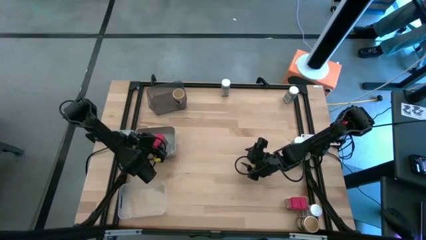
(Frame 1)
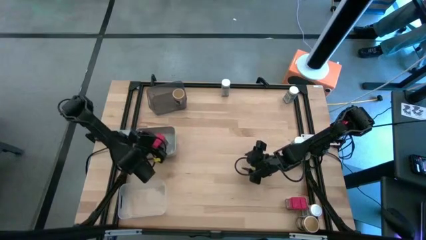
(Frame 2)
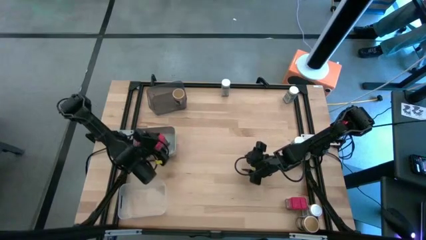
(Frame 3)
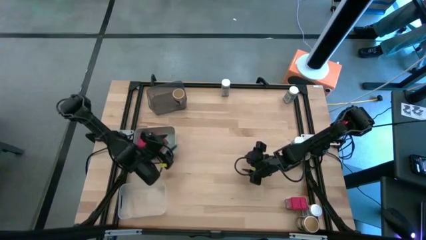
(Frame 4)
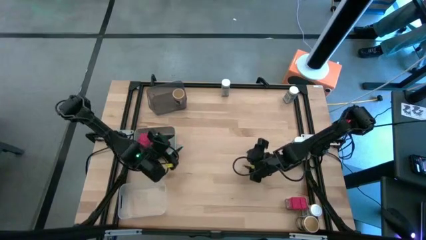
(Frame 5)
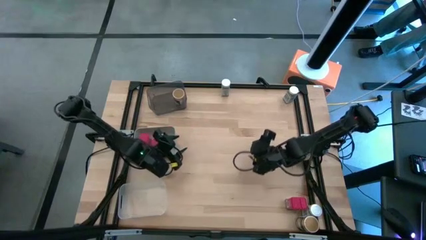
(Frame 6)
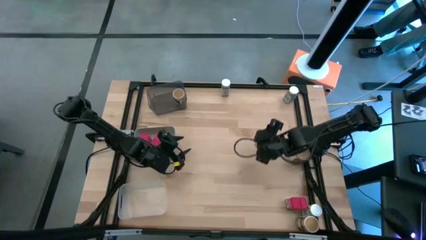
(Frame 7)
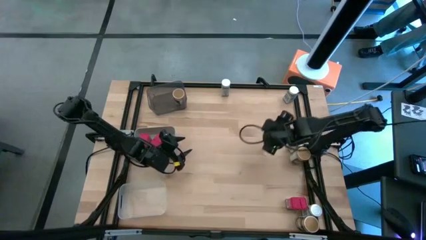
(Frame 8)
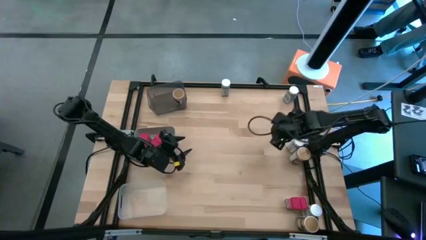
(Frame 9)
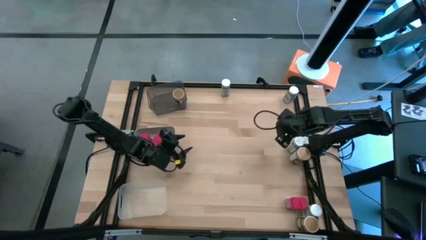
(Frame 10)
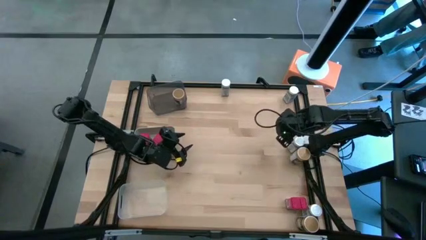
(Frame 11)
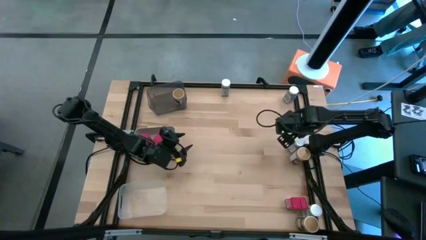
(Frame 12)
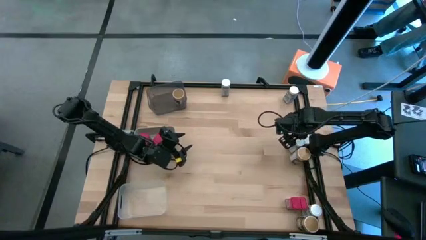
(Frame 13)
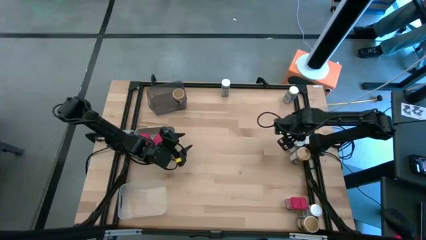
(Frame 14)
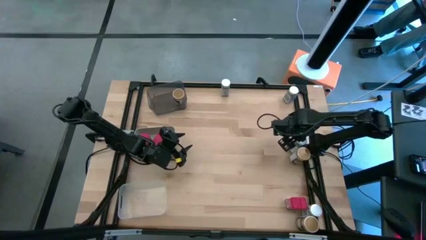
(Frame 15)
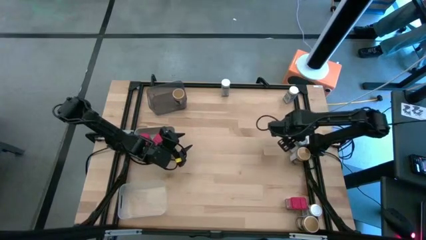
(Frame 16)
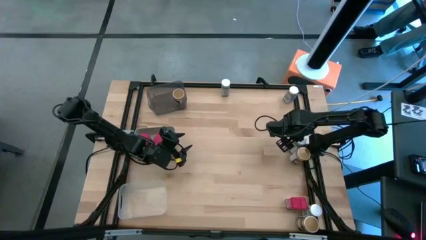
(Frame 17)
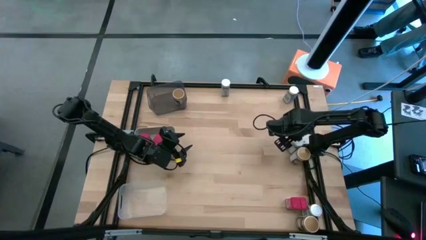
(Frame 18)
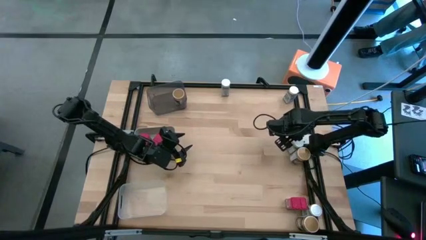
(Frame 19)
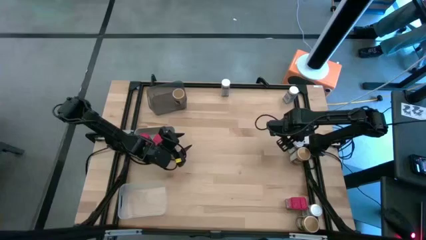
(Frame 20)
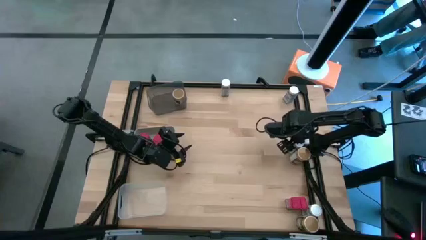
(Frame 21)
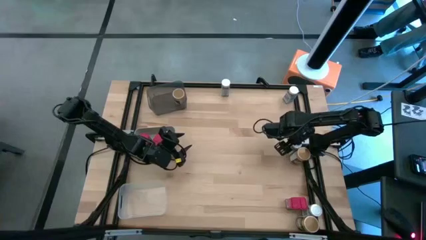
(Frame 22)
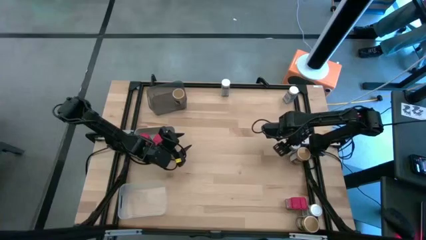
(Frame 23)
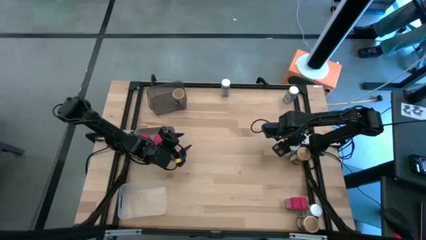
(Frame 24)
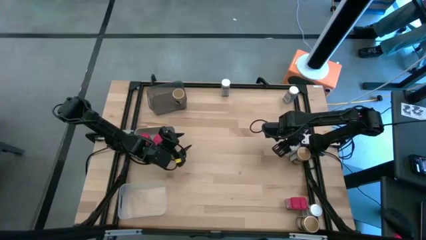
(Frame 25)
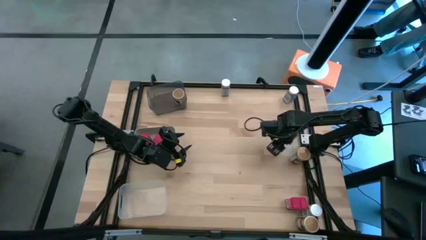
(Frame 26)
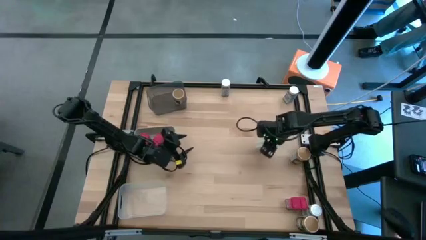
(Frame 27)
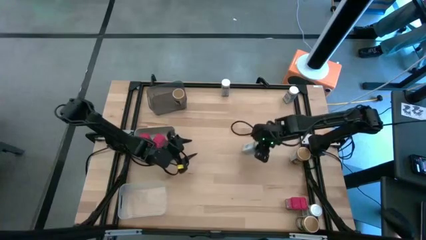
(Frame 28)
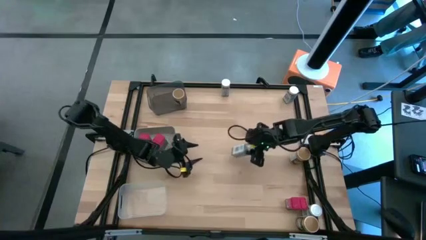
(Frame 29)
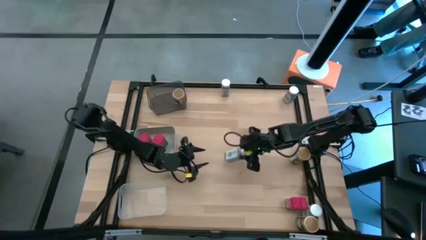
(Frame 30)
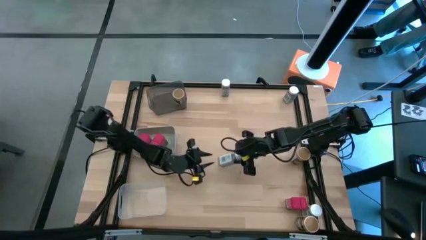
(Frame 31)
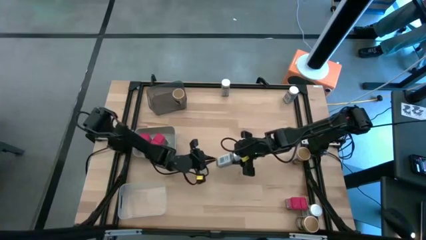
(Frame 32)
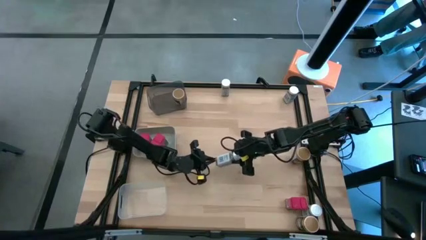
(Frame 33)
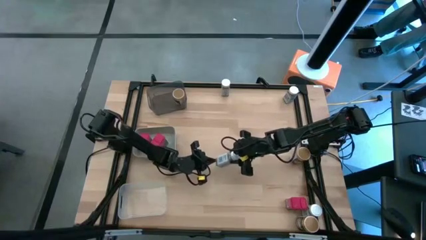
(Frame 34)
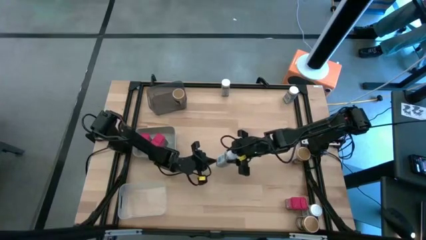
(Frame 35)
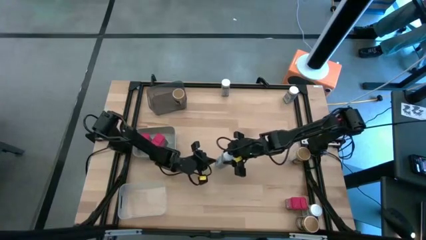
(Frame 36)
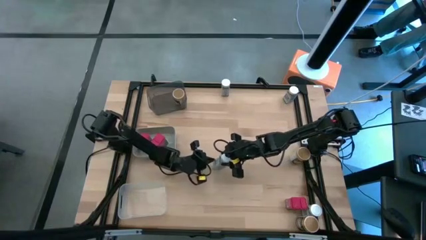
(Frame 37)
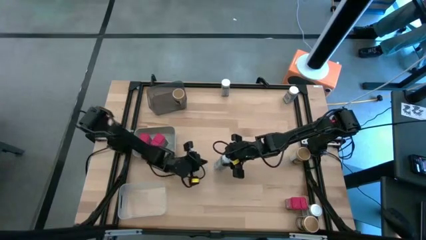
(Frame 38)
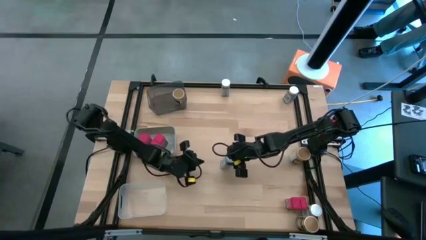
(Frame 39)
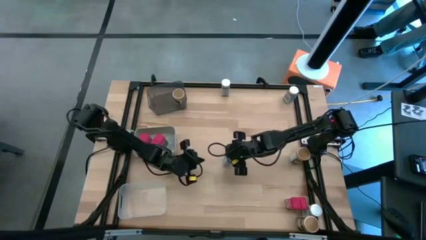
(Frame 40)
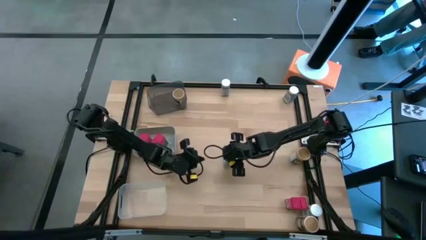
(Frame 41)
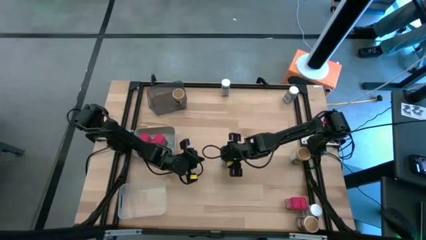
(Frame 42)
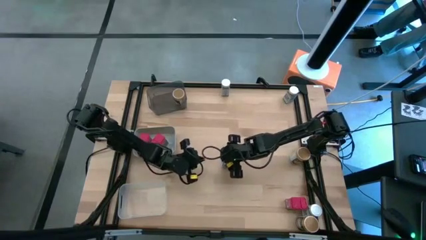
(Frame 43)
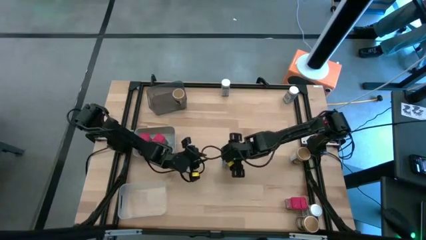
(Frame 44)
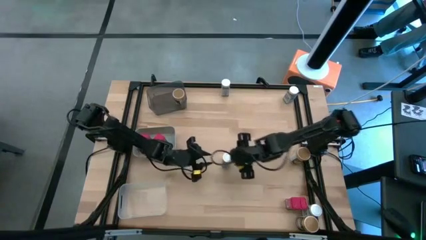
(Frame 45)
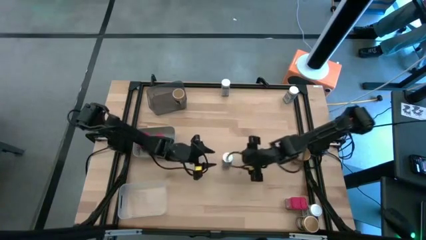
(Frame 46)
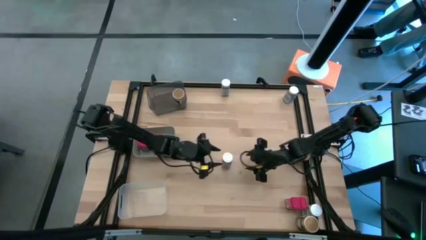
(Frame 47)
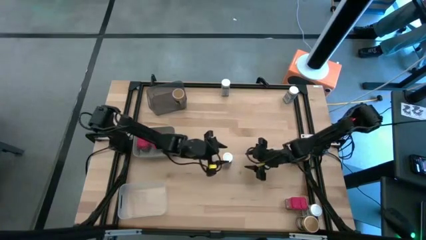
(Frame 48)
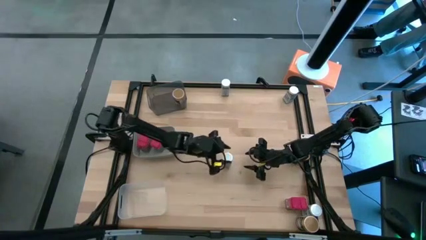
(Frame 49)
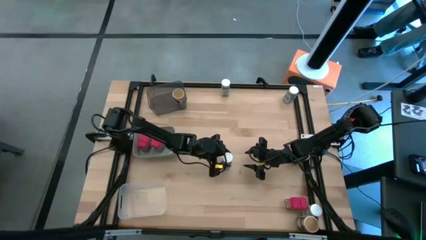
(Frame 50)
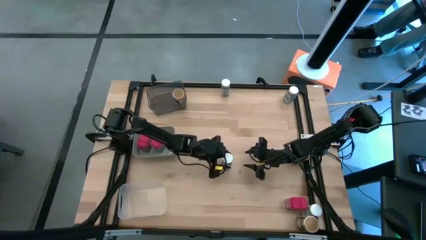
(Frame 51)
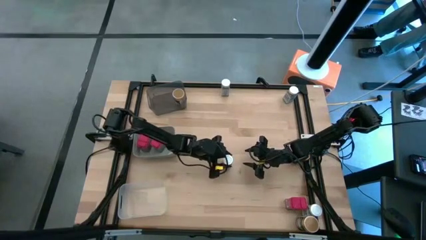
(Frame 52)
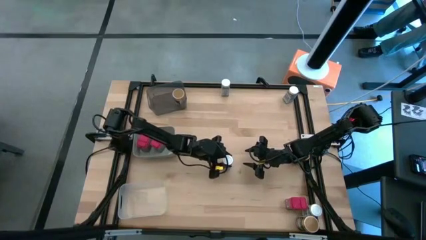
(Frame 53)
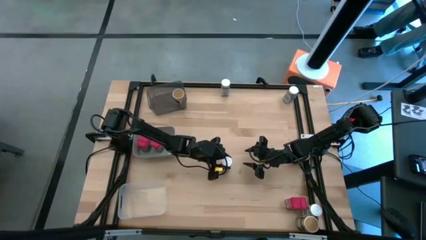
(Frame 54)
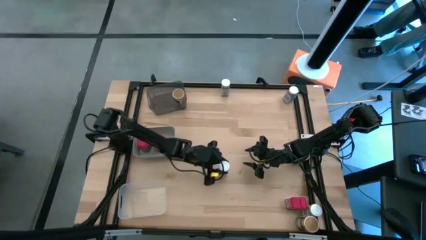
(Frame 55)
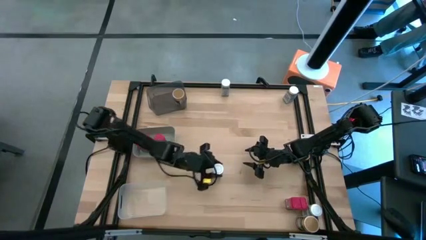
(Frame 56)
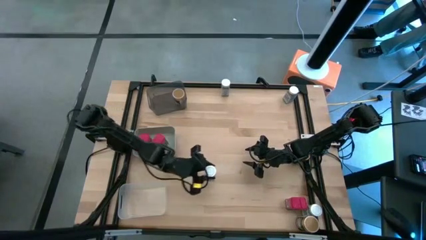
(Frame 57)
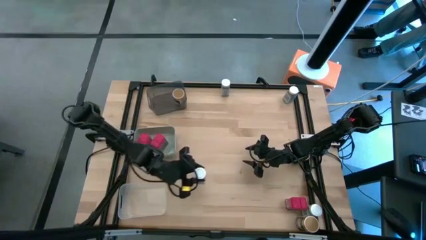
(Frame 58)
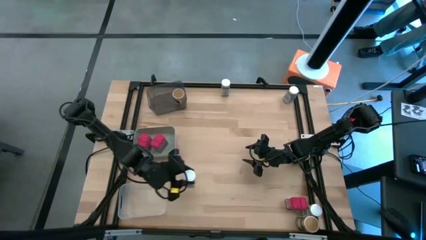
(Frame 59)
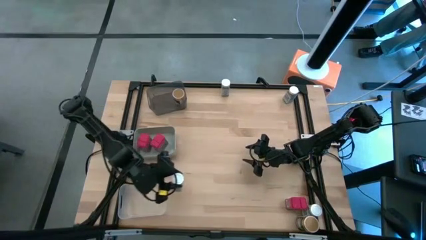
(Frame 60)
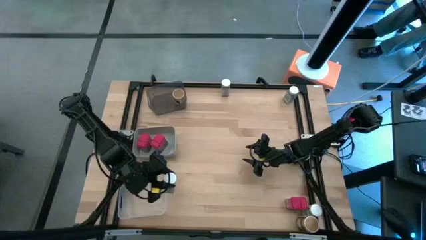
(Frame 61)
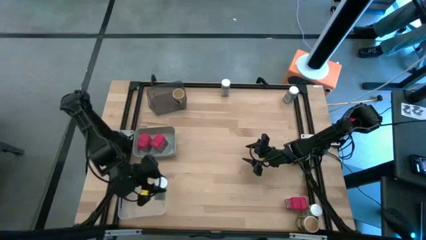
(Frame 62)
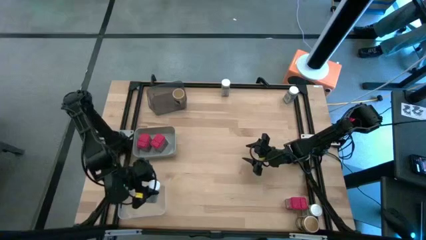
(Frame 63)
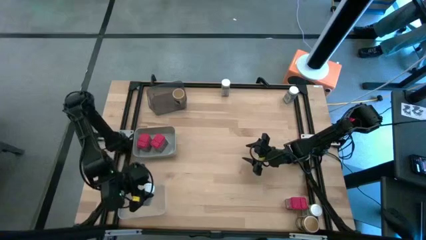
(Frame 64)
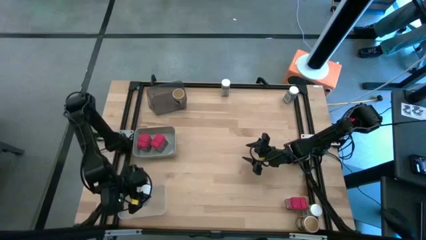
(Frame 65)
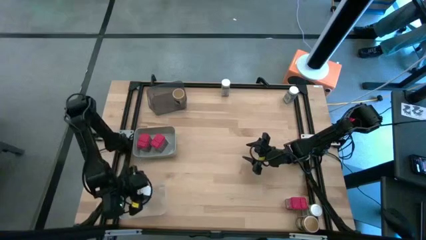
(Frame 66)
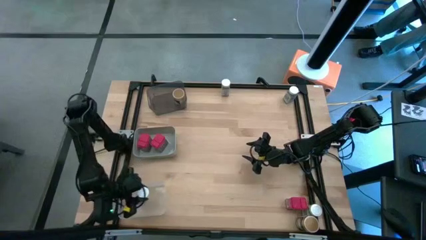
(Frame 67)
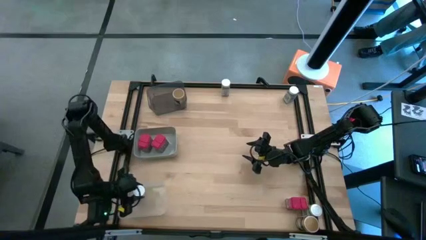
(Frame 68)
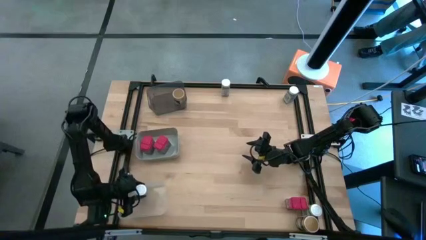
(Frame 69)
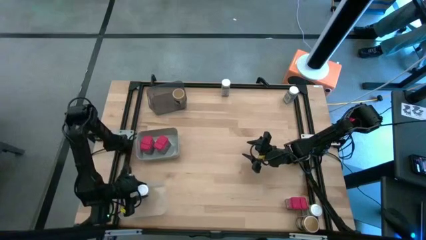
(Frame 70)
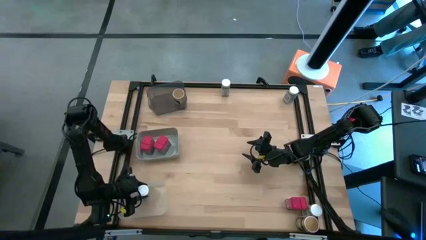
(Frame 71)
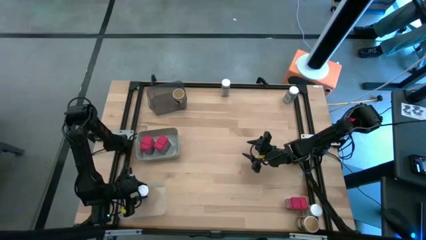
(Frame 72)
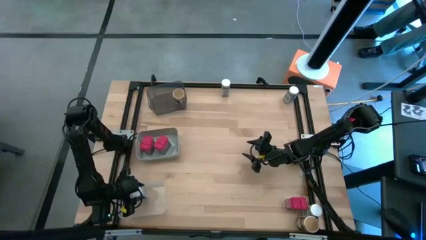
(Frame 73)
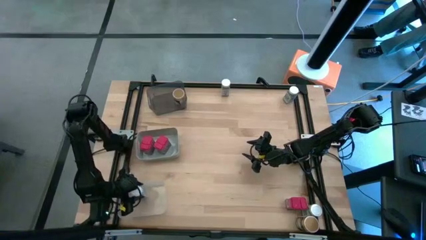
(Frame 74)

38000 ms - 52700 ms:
Task: Sort spices by type
Put the middle right white seasoning bottle into the transparent bin

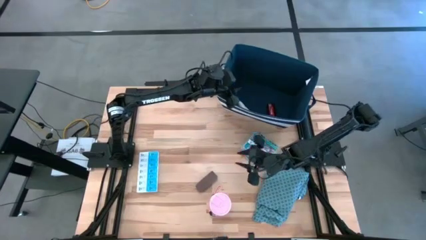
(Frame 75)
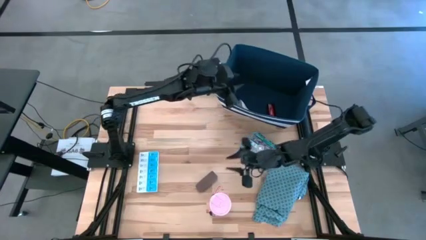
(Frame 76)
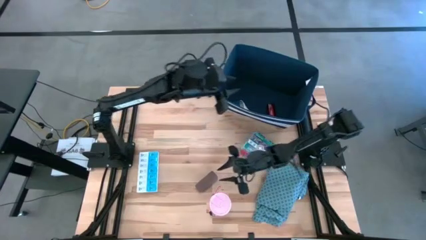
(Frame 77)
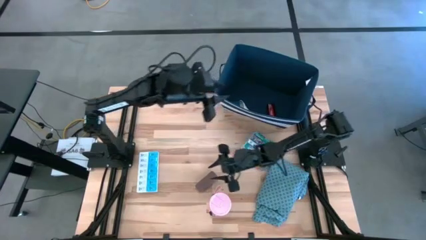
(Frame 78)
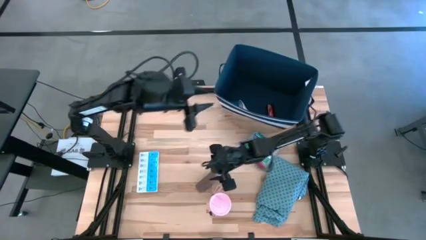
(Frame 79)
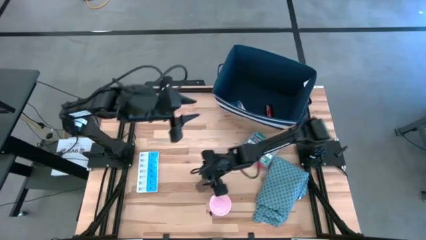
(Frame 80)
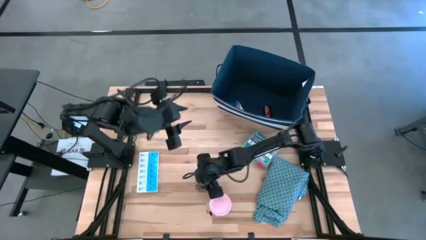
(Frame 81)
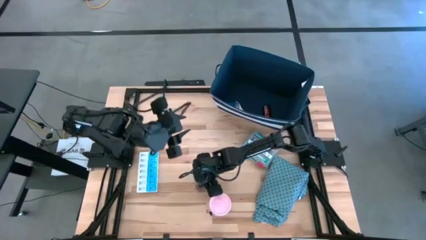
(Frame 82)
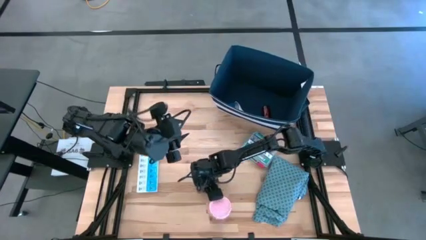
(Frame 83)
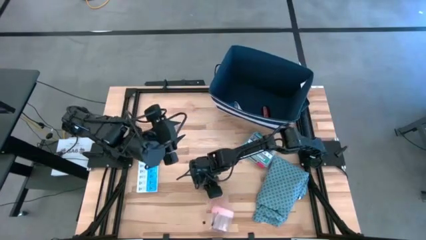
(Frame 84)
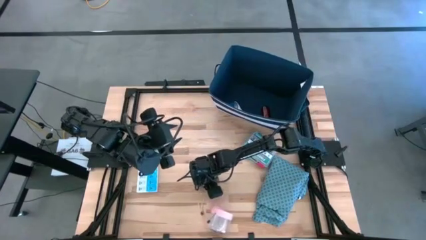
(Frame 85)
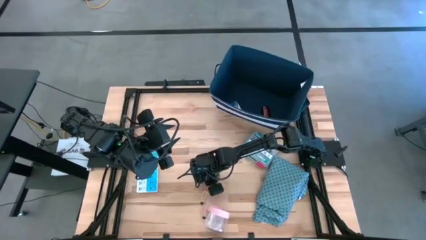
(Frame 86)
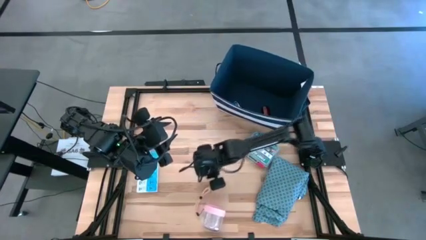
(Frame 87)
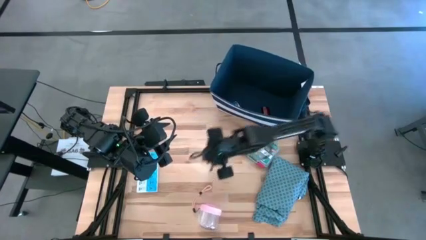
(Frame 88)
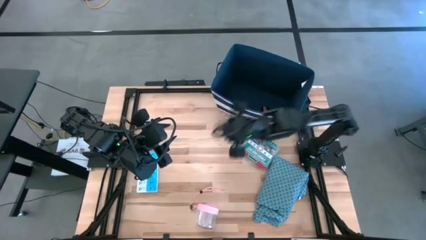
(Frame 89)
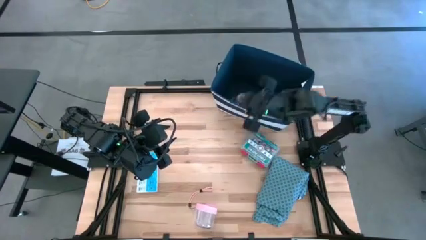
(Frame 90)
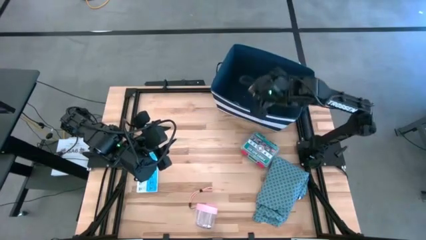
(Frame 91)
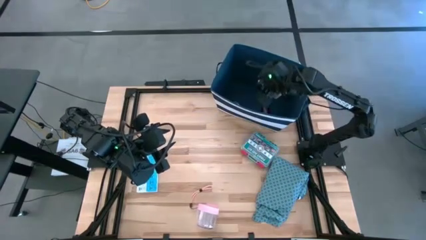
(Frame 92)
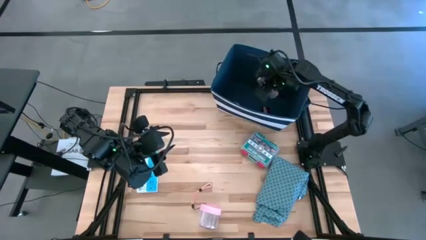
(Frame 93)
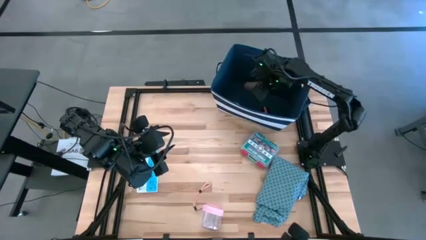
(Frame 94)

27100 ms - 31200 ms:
Task: Pick & place medical supplies in basket/bin
Put the brown bandage into the white bin
